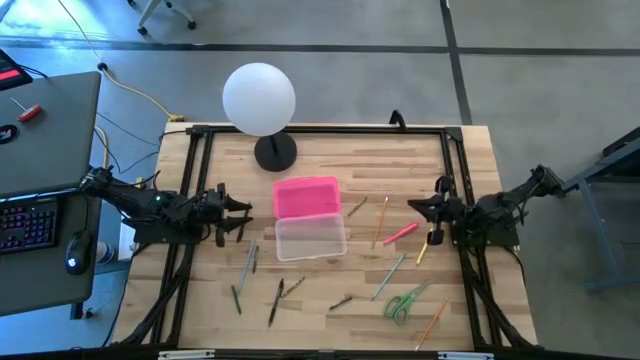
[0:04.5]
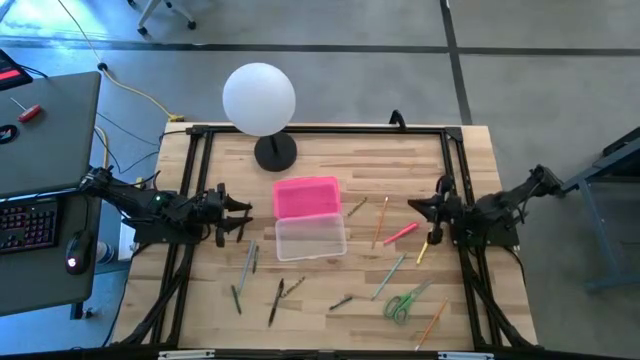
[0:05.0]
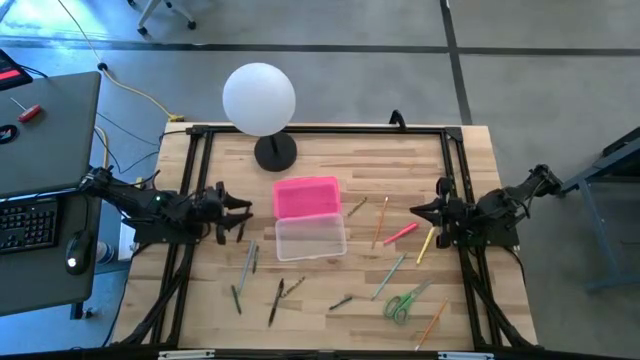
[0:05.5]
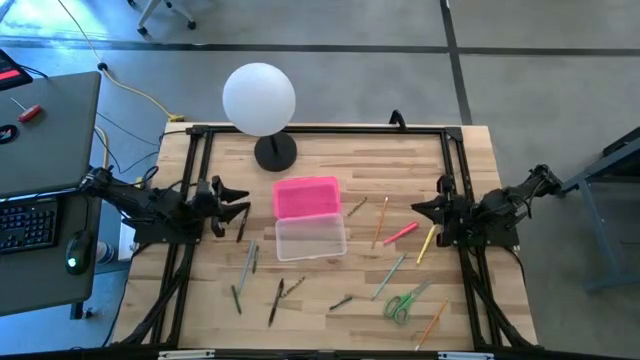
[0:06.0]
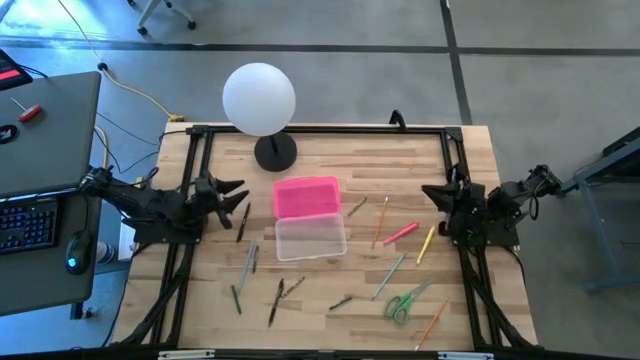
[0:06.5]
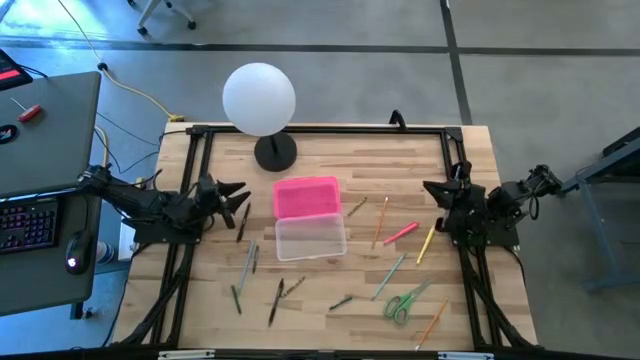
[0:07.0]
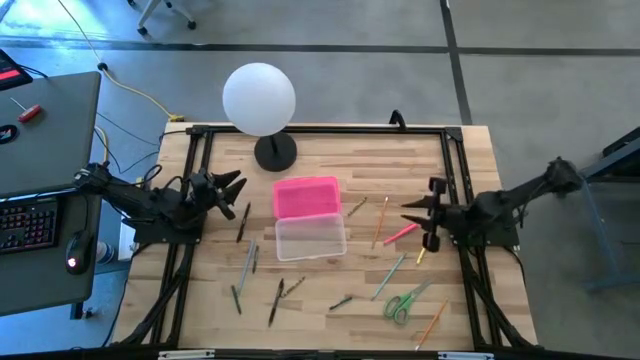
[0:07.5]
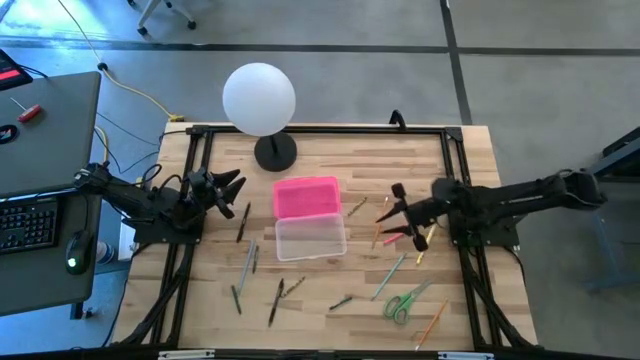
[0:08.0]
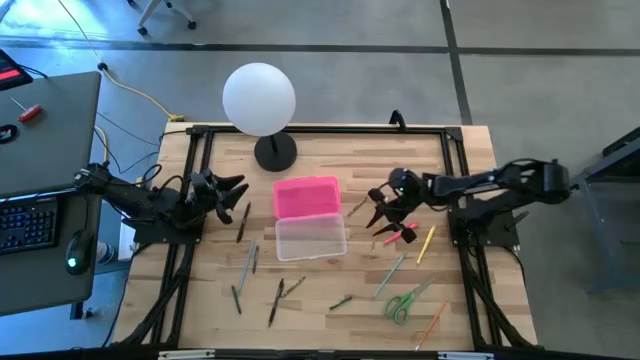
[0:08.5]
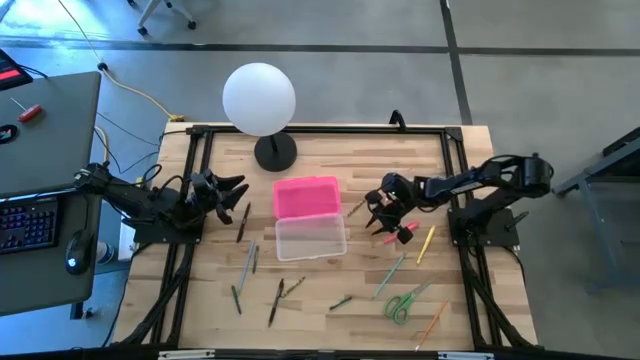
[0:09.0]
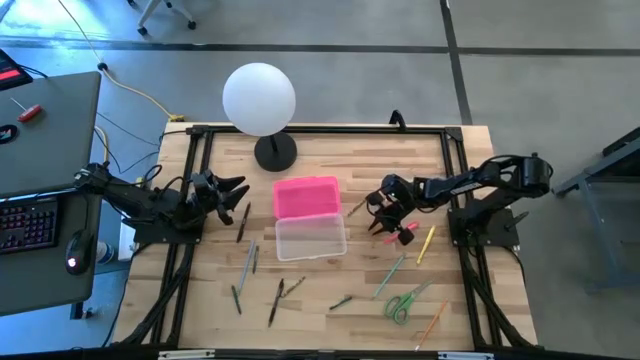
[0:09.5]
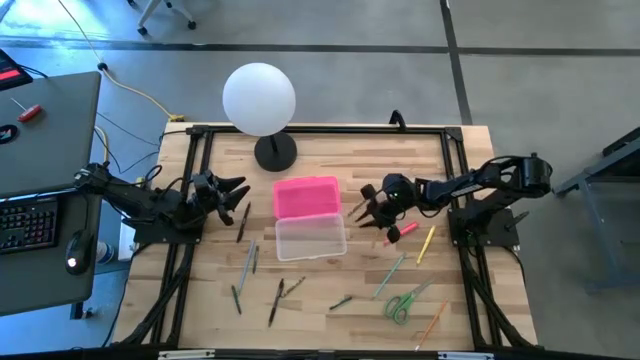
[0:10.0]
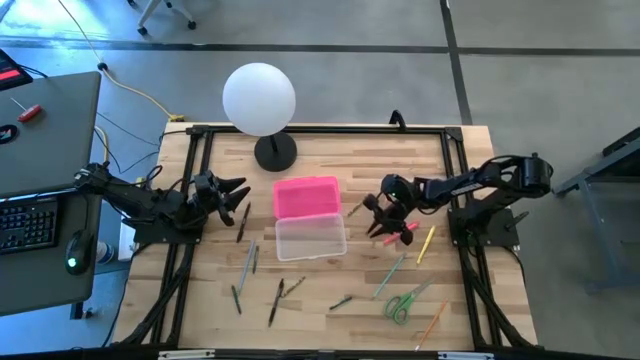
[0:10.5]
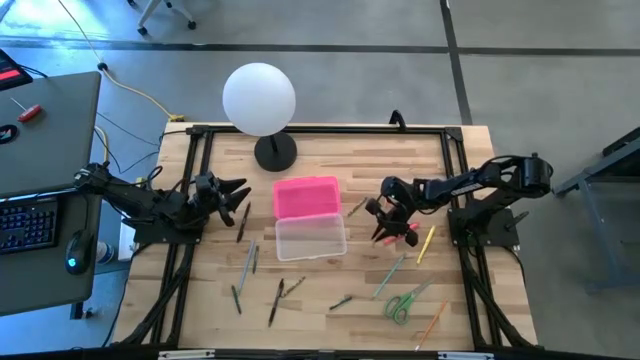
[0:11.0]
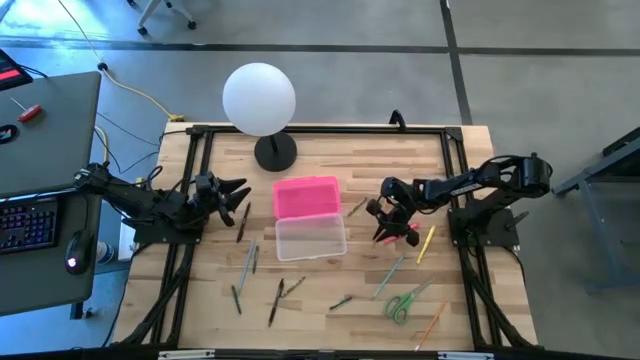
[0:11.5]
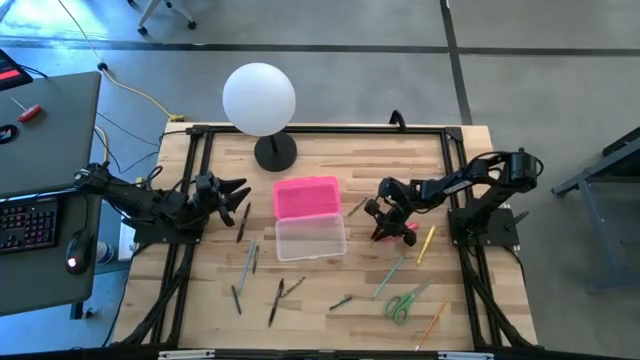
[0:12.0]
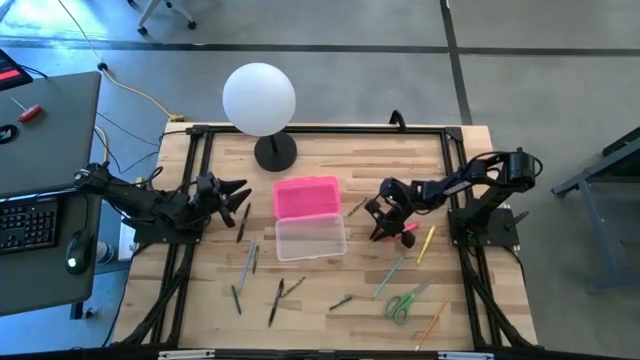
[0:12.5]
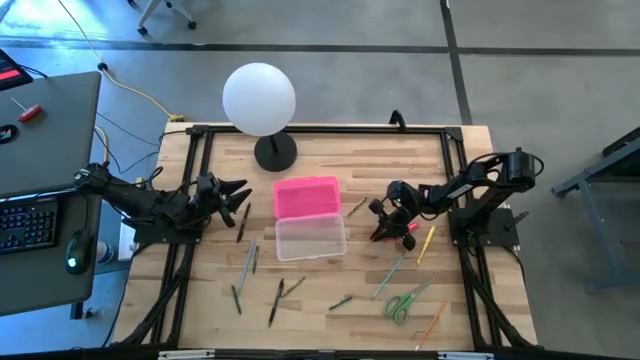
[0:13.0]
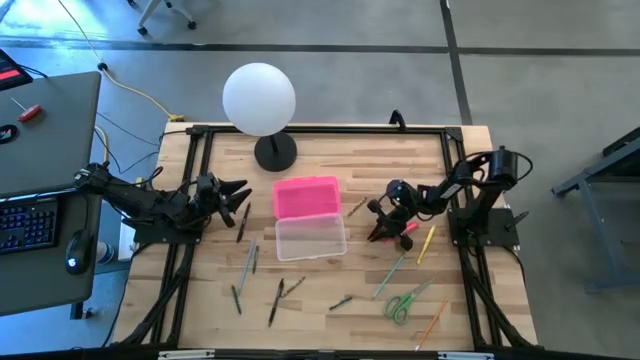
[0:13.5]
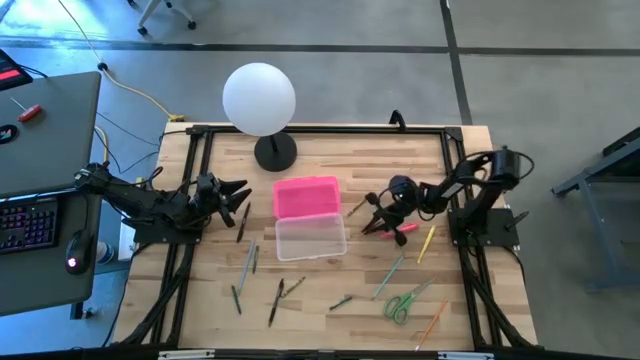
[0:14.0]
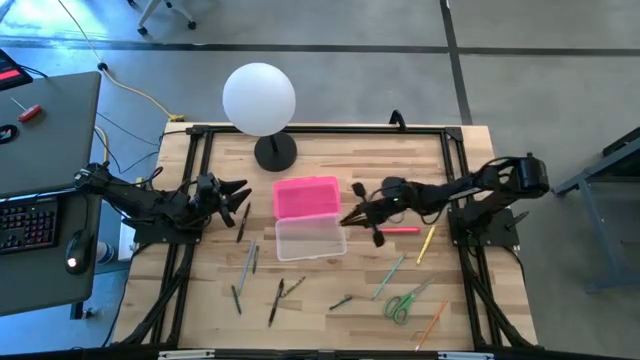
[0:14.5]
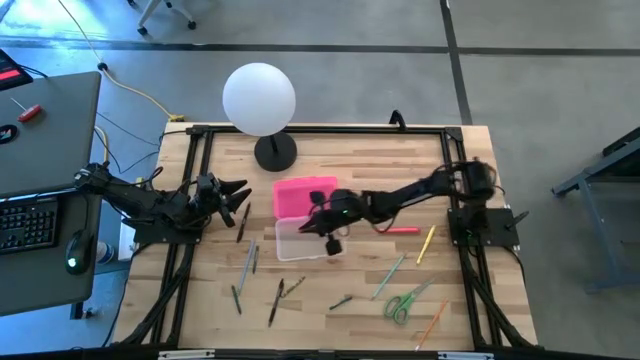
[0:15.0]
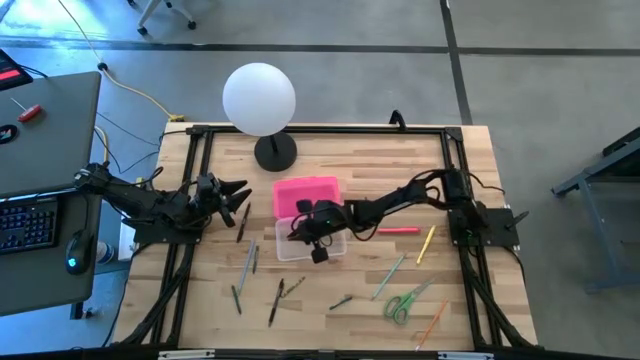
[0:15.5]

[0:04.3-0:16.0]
Task: Pick & place school supplies into a supply box
Put the top orange pencil into the pink supply box

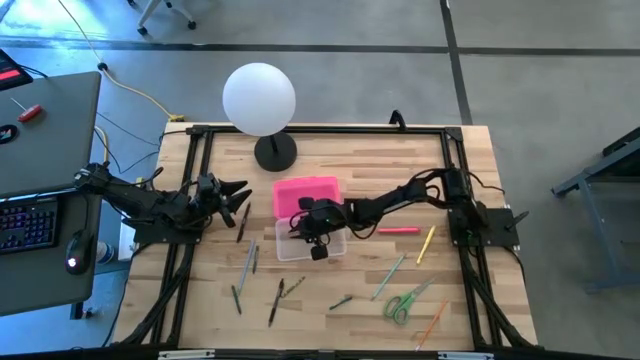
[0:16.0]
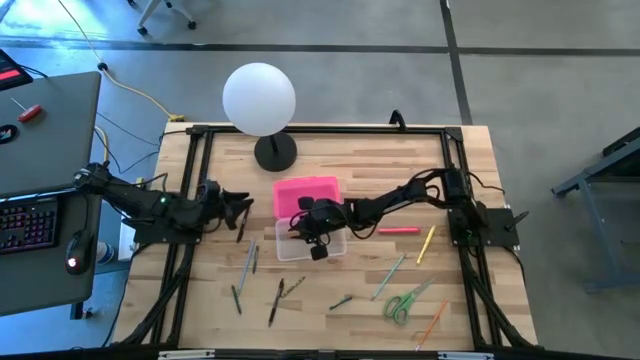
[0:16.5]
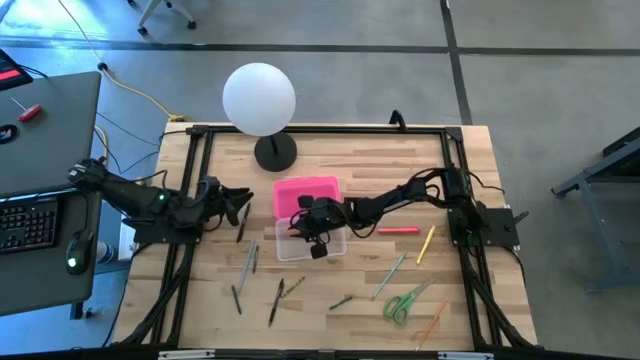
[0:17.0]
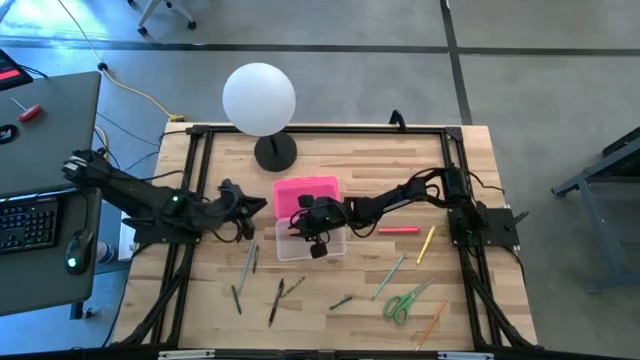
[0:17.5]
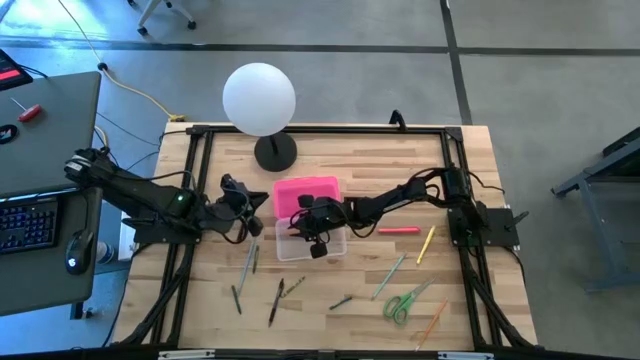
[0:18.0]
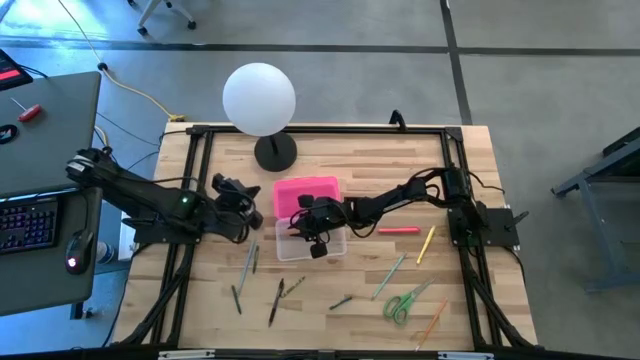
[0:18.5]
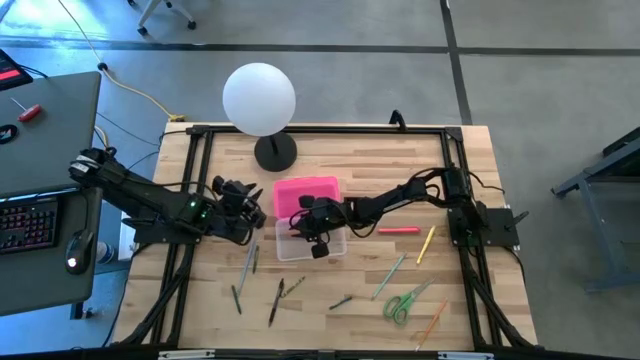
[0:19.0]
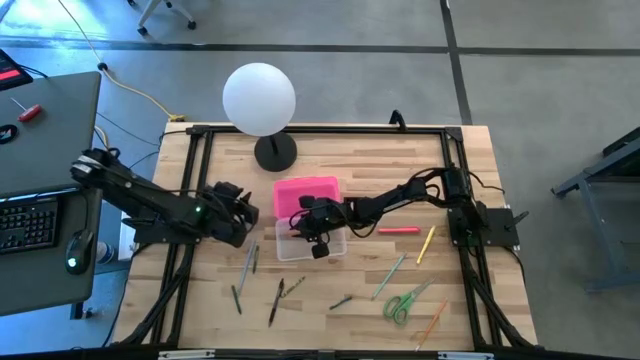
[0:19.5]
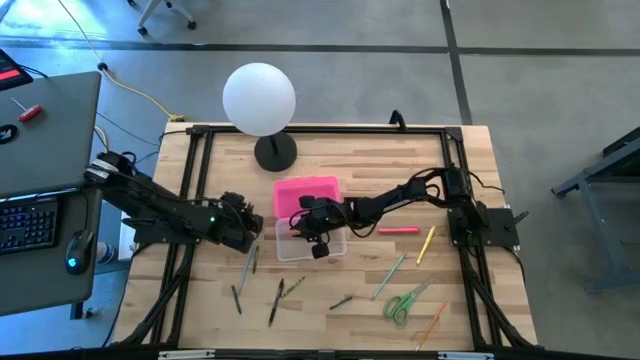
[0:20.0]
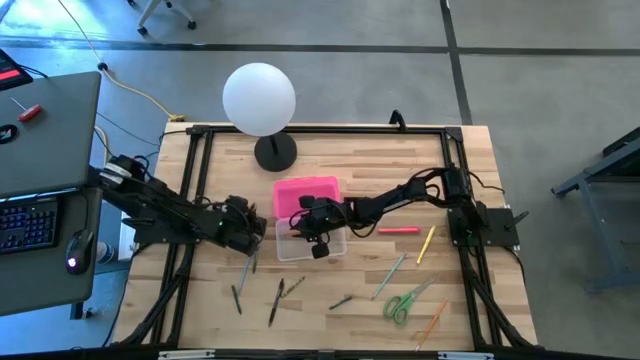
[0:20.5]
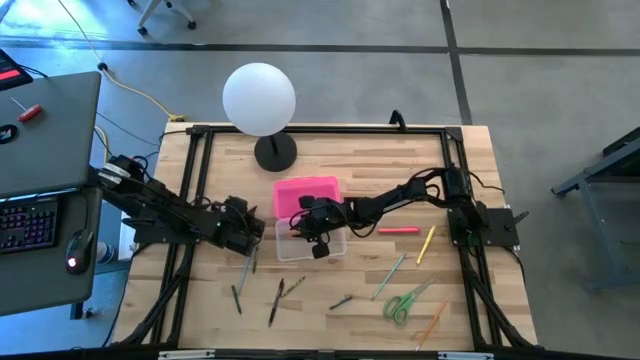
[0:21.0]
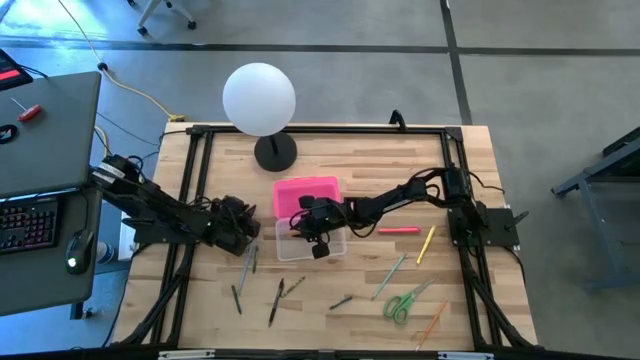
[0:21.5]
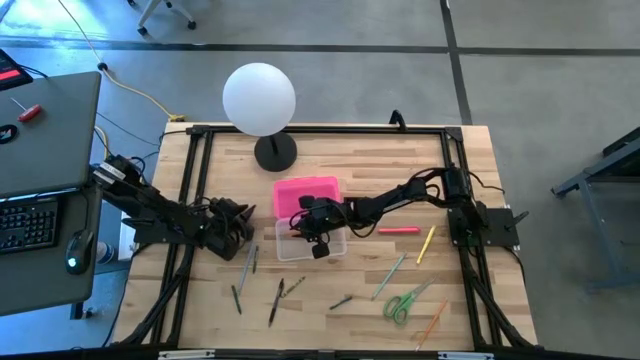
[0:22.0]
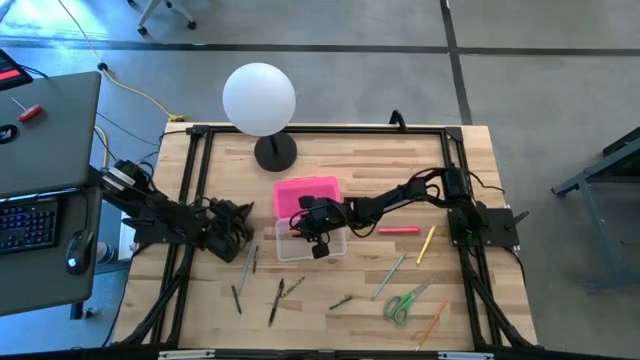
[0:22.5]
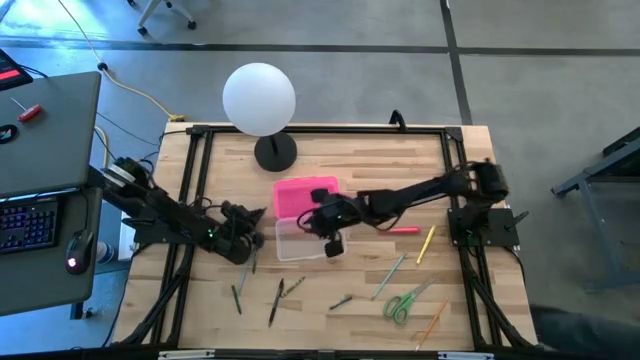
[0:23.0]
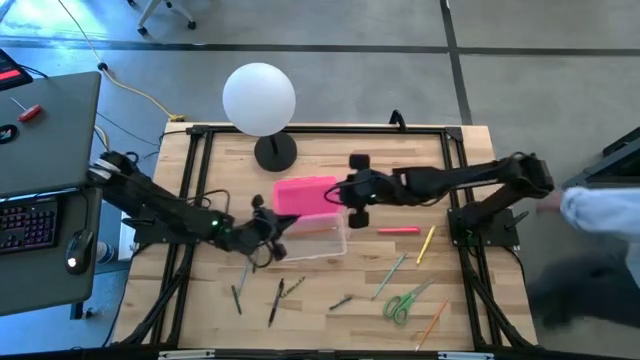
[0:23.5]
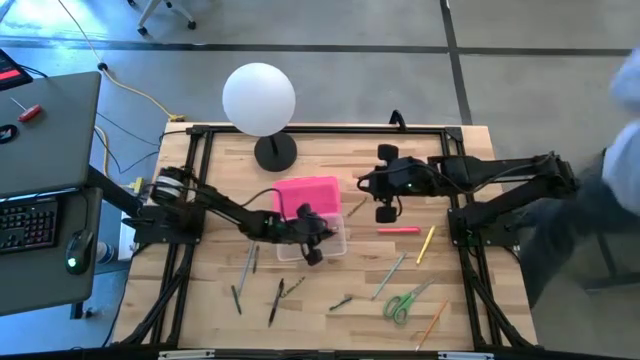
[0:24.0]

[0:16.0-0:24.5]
Put the top black pen into the pink supply box

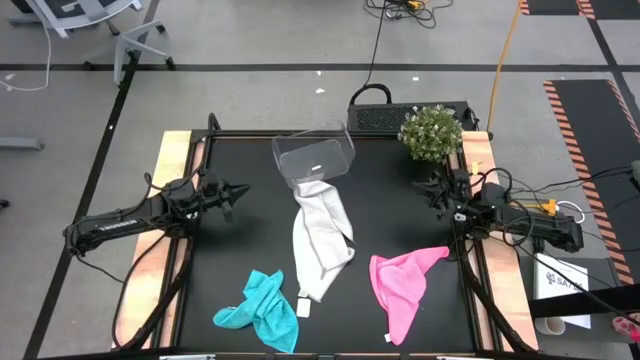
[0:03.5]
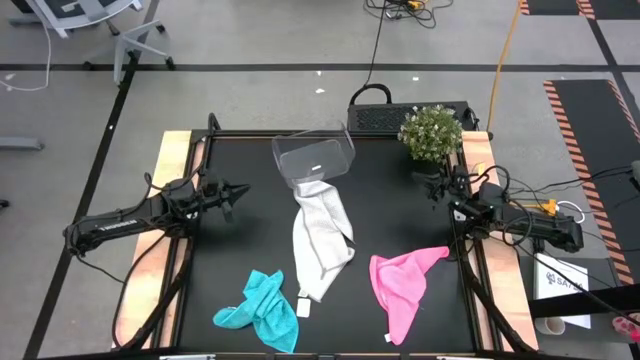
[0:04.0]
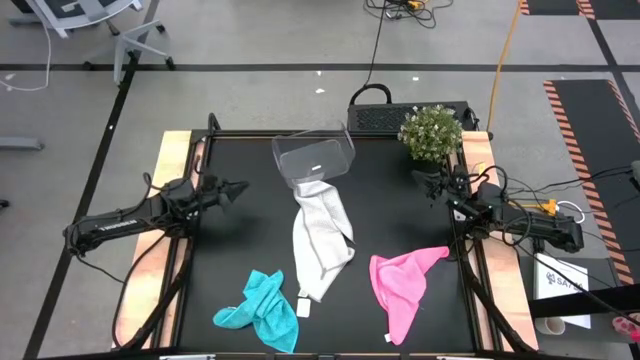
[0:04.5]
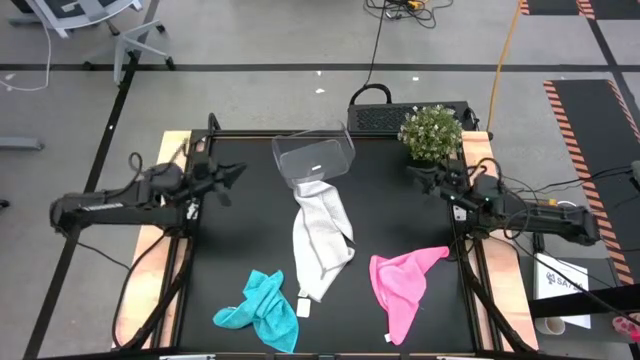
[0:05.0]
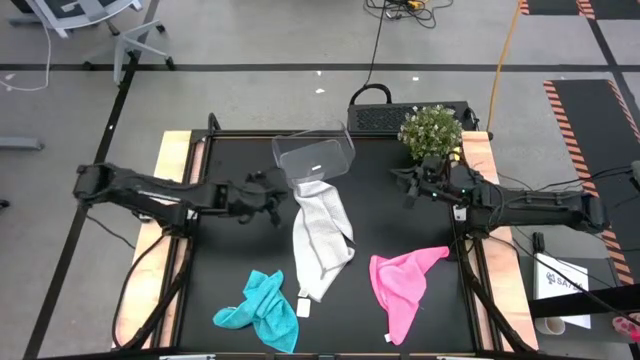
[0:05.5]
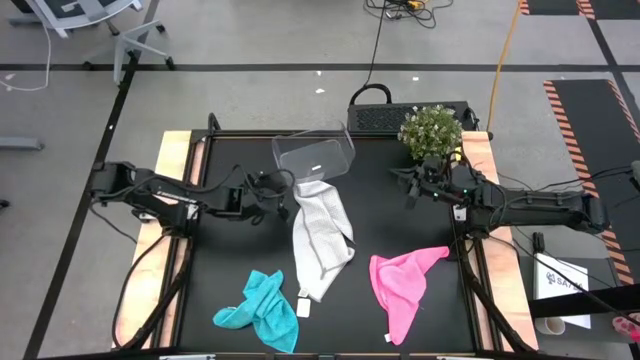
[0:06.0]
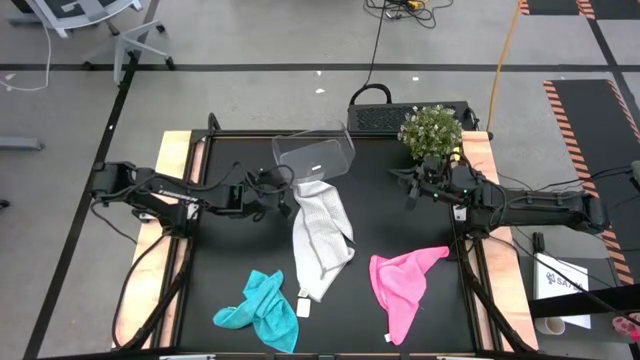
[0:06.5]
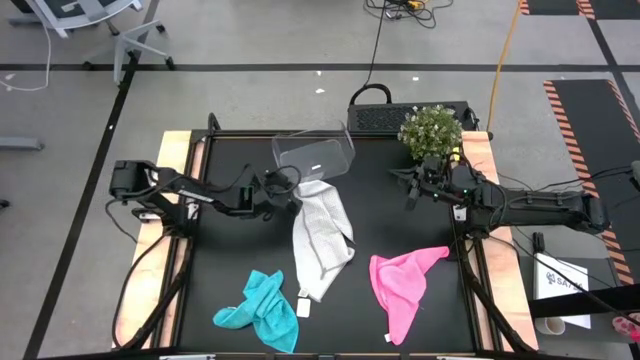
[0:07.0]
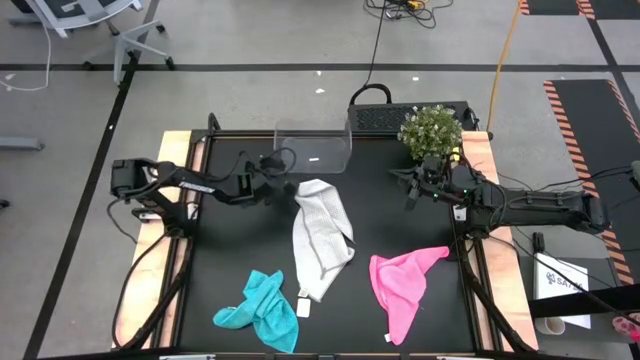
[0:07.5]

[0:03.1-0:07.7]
Task: Fold microfiber towels
Adjust the transparent bin on the table
